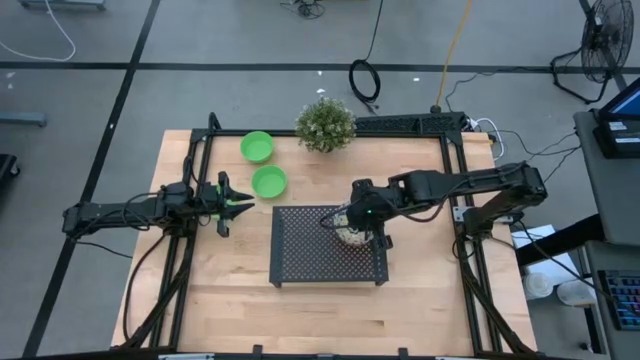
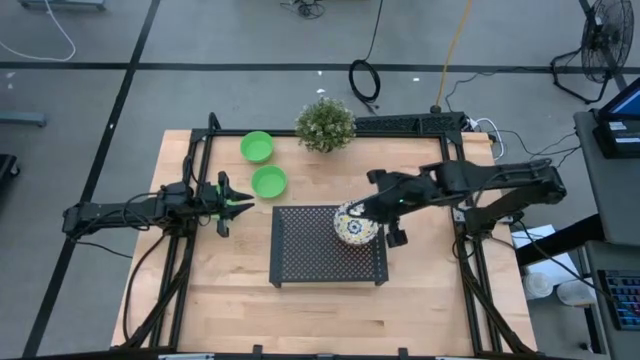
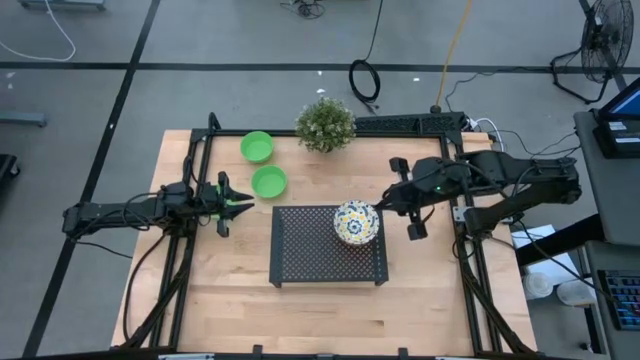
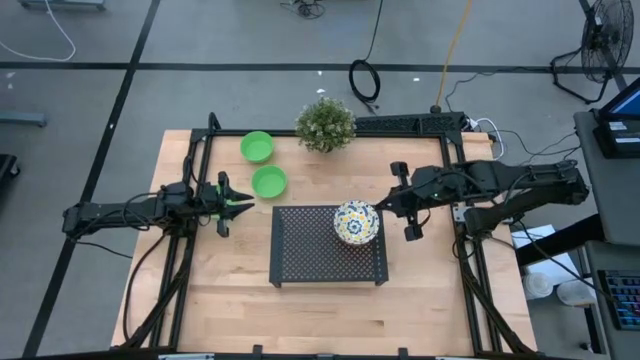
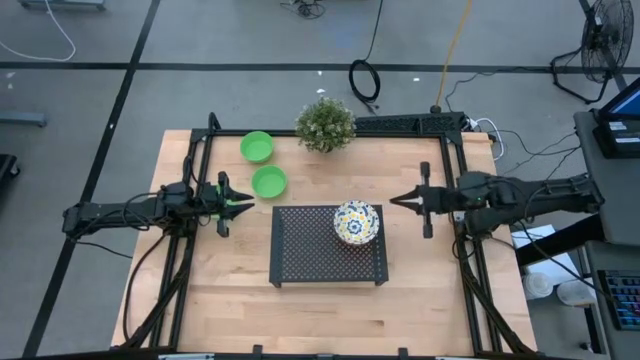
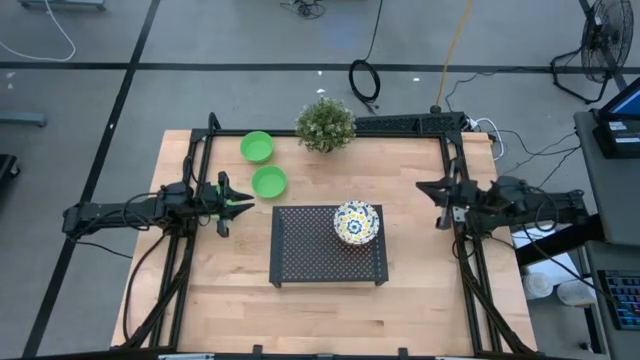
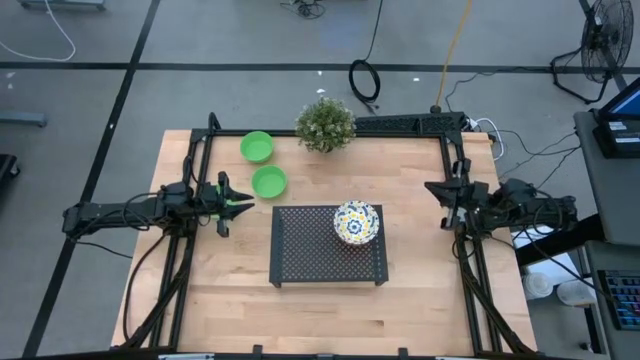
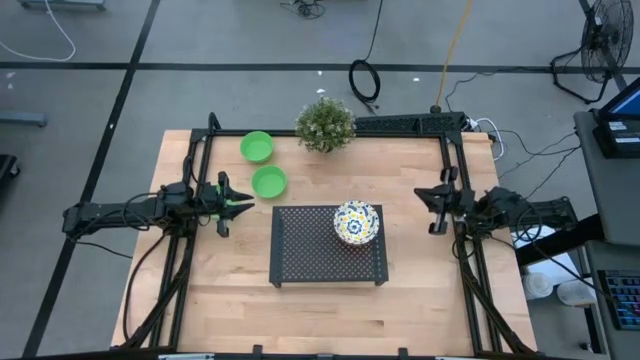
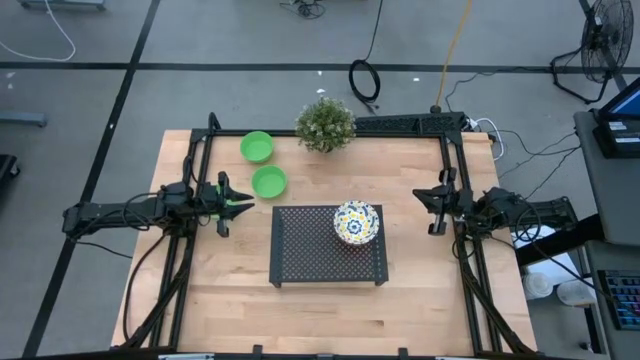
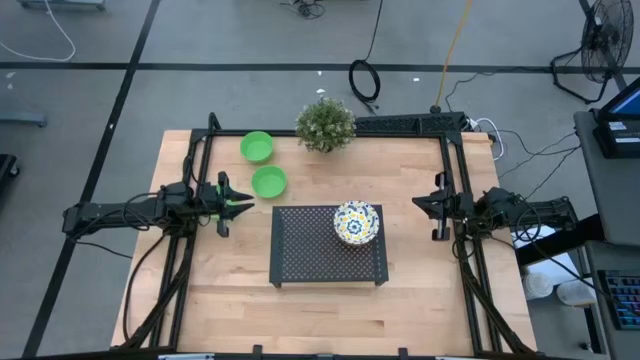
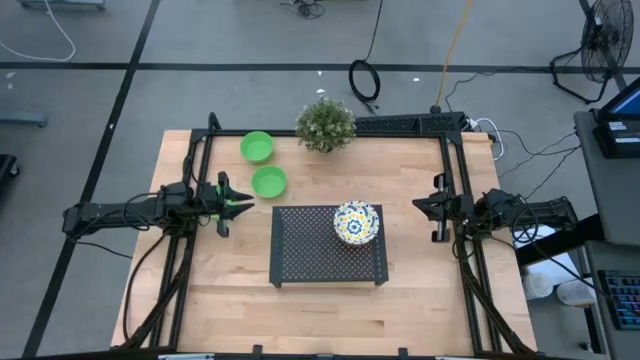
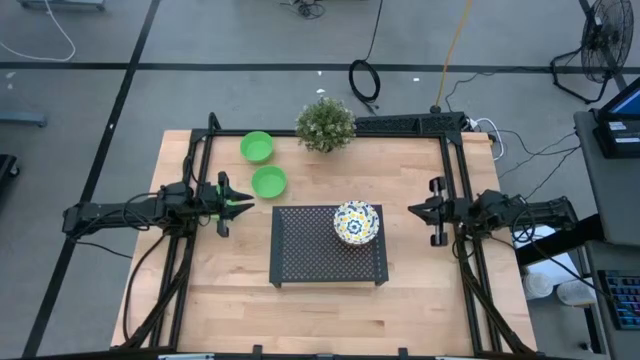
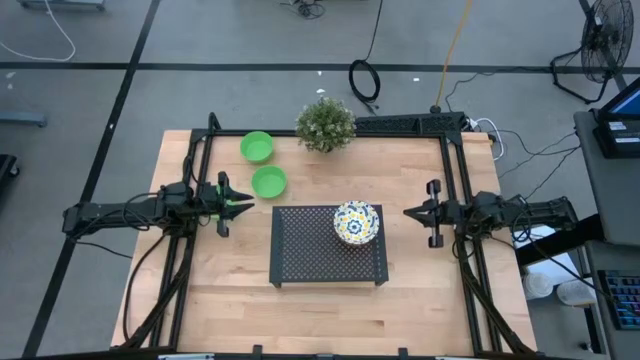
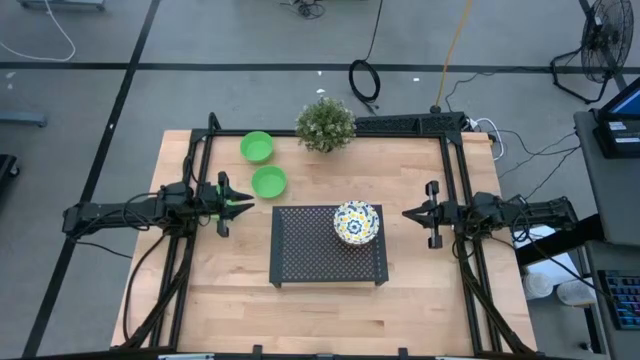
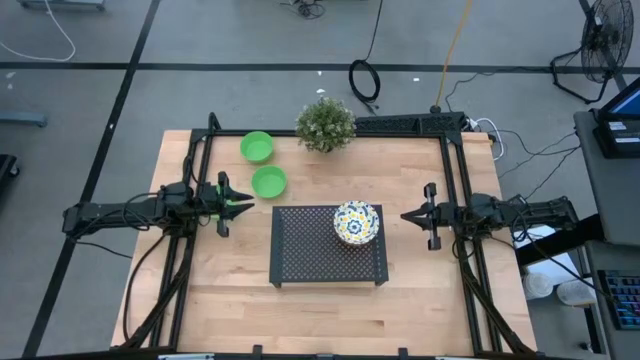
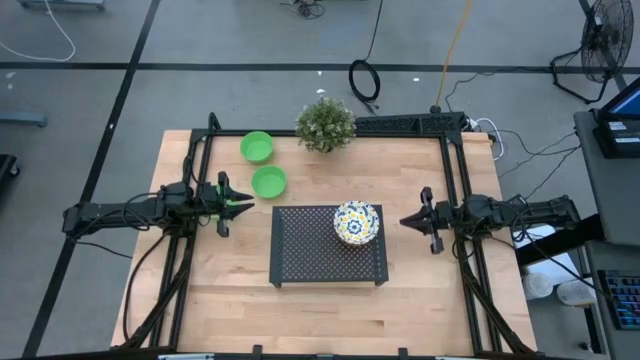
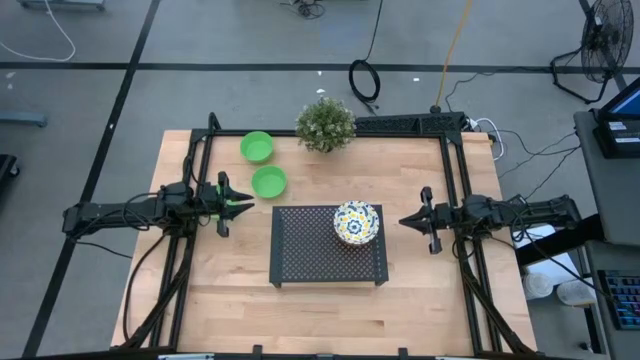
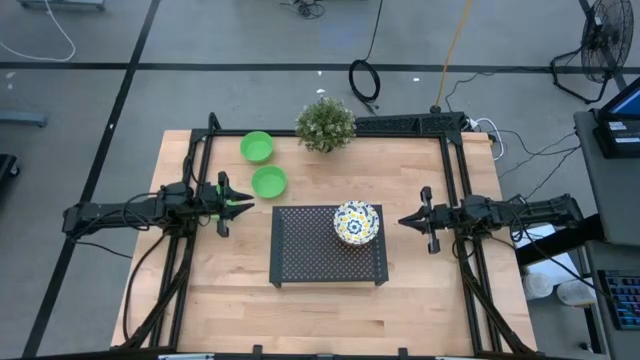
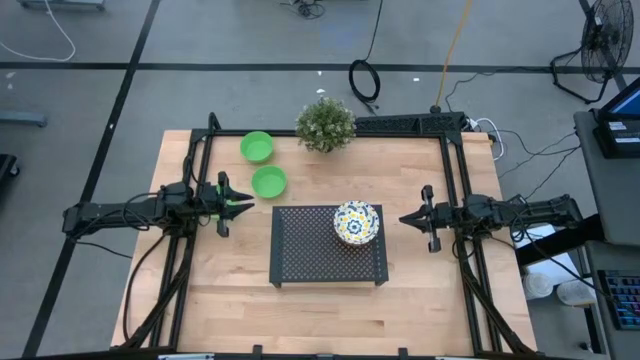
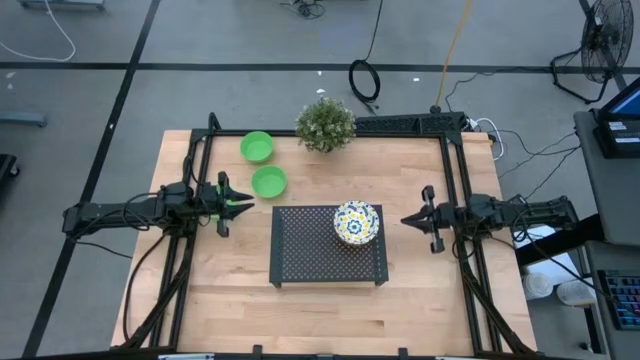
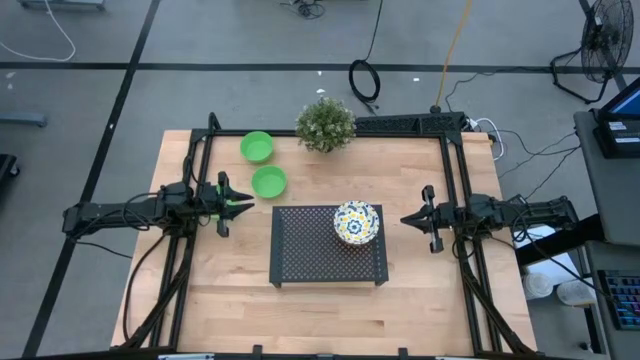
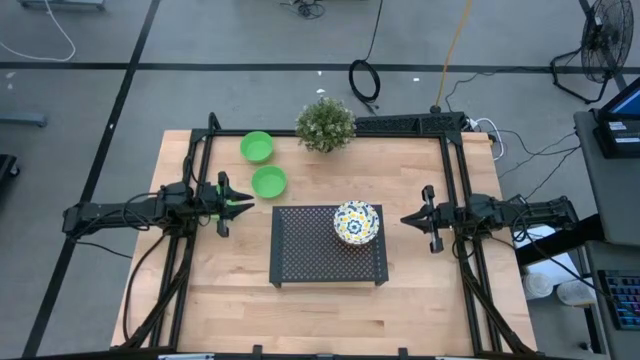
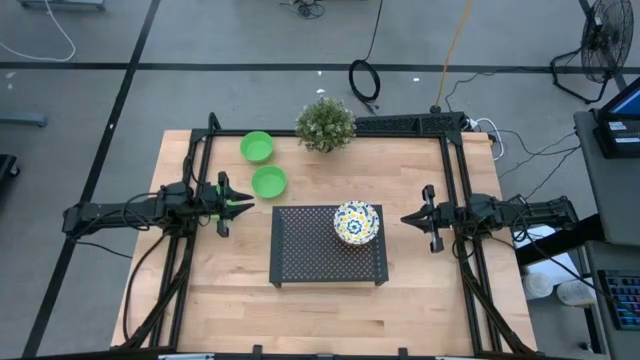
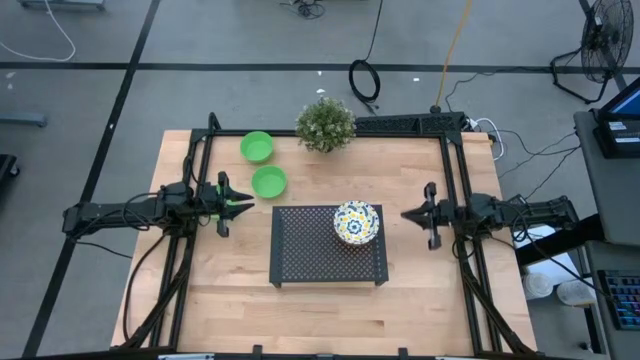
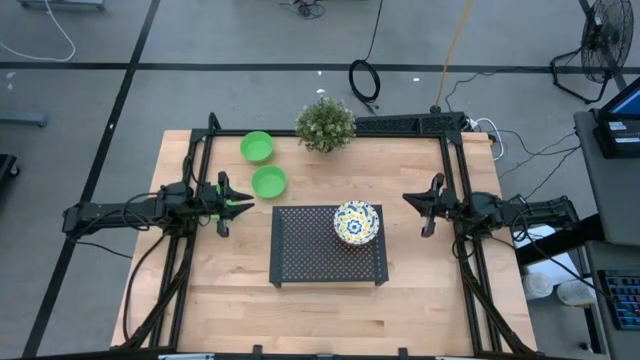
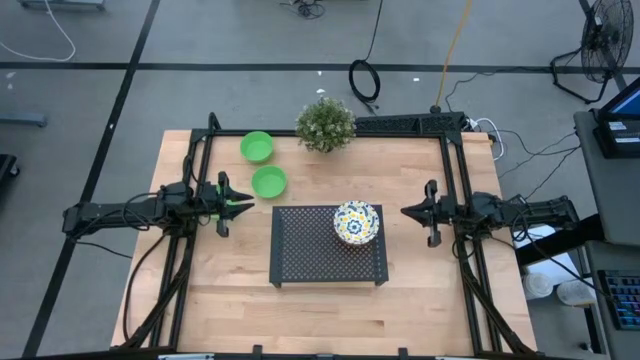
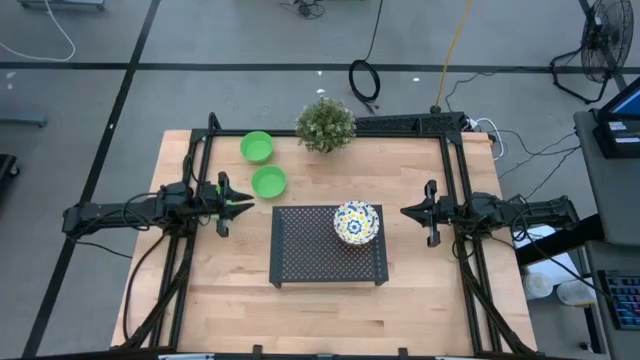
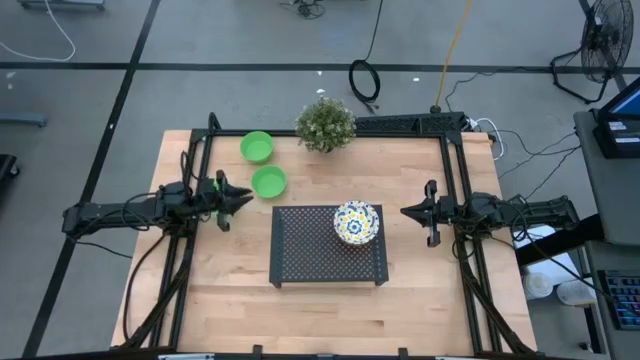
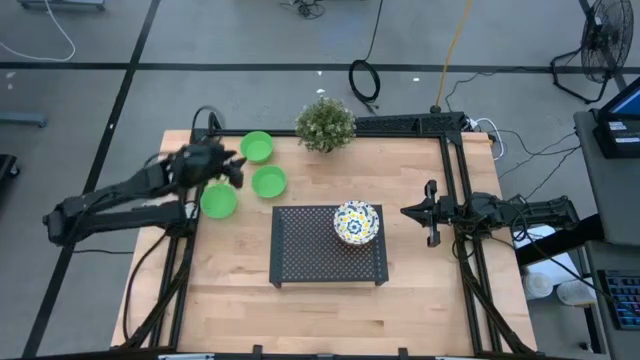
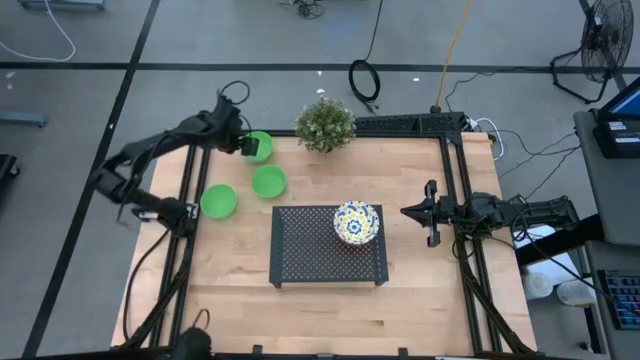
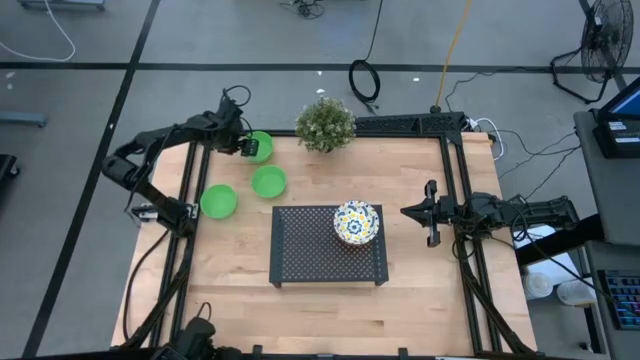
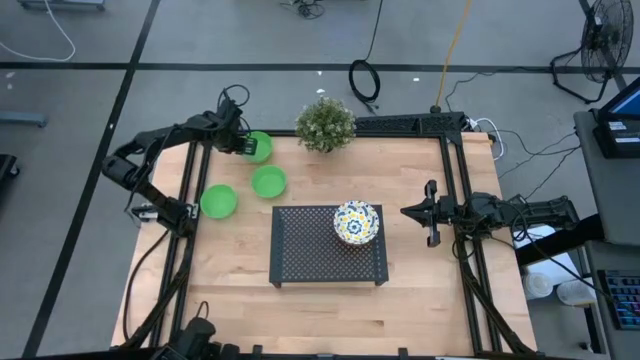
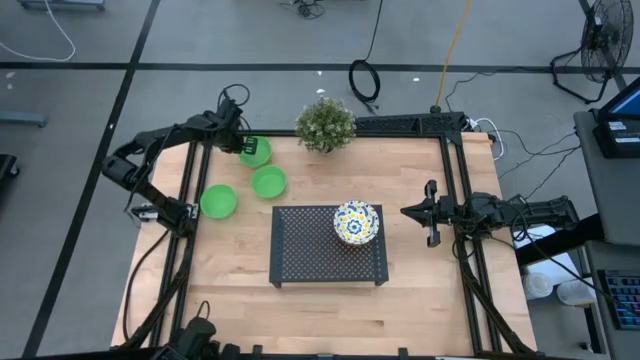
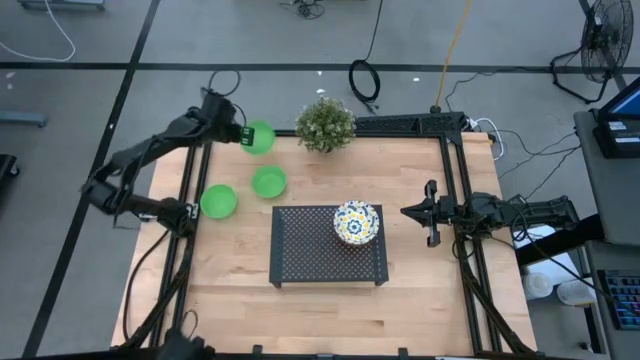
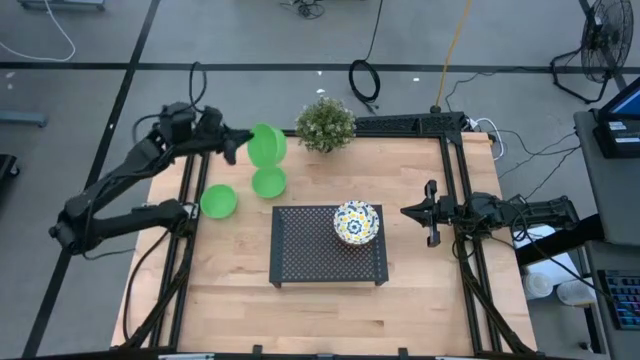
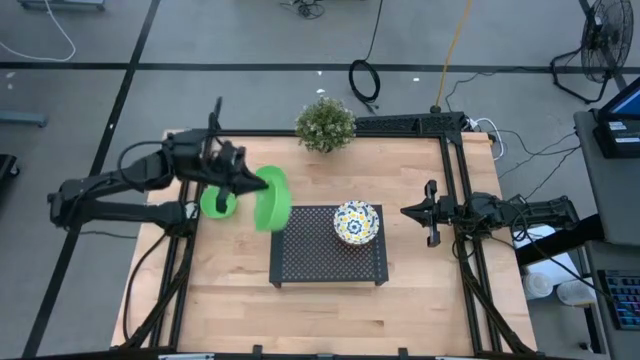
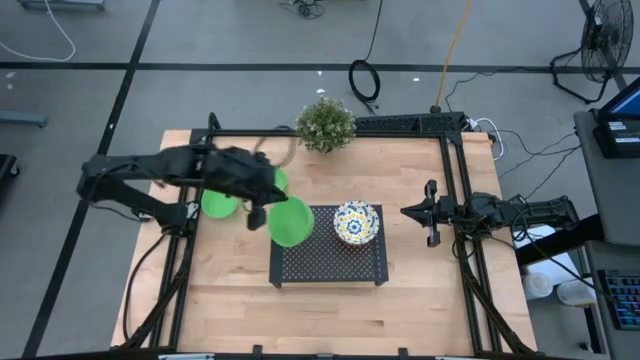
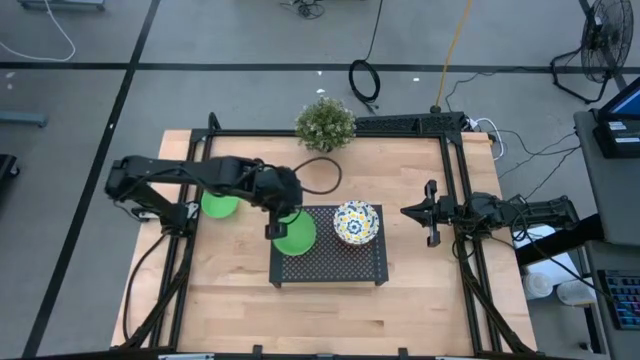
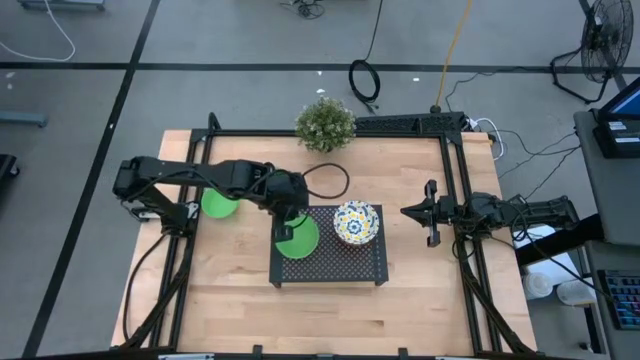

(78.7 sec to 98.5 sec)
Task: Pick & Place Mini bowls
Put the top green bowl on the shelf

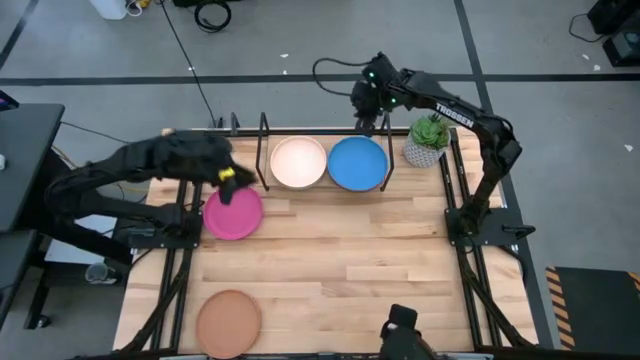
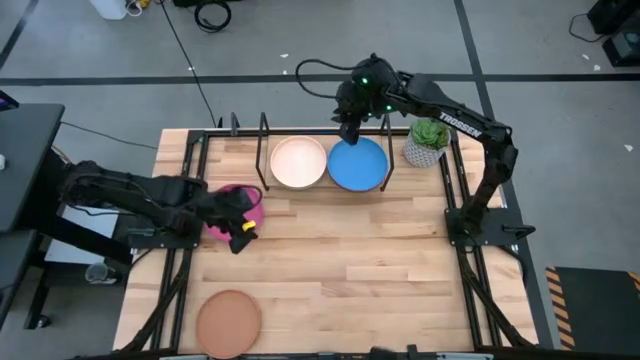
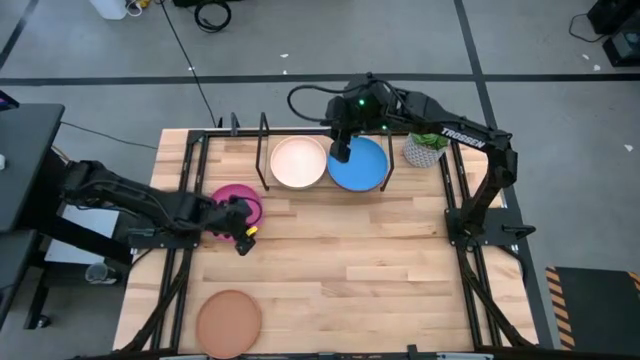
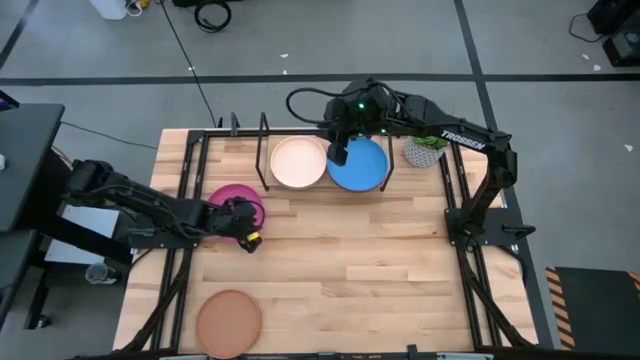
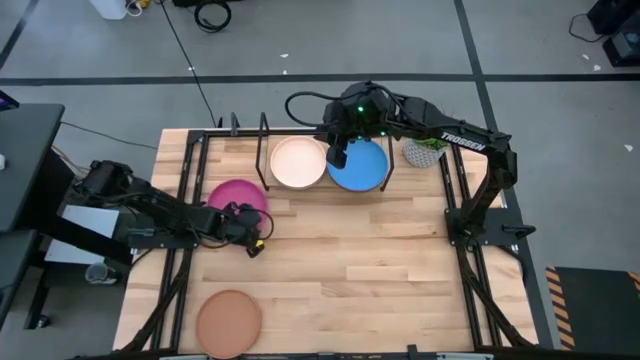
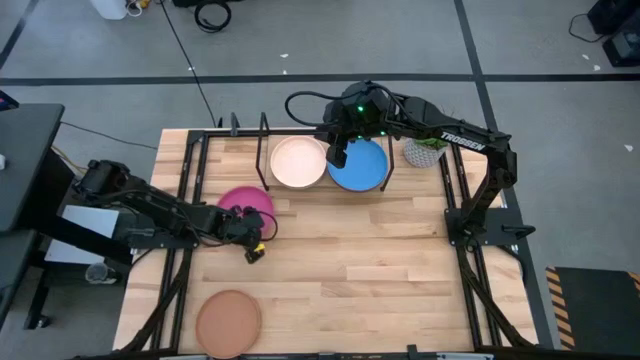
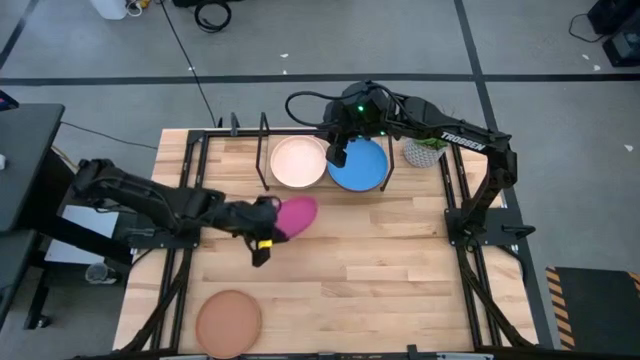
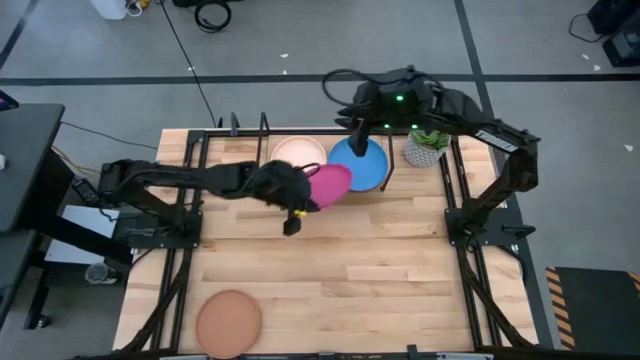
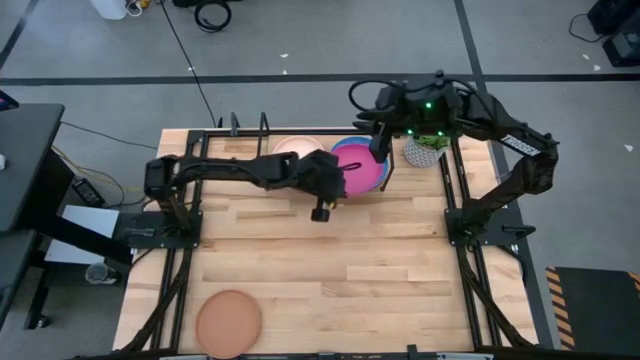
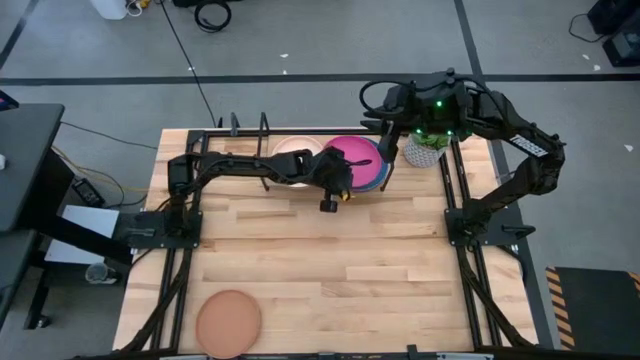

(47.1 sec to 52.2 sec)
Task: Place and stack plates onto a shelf
Stack the pink plate on top of the blue plate on the shelf
